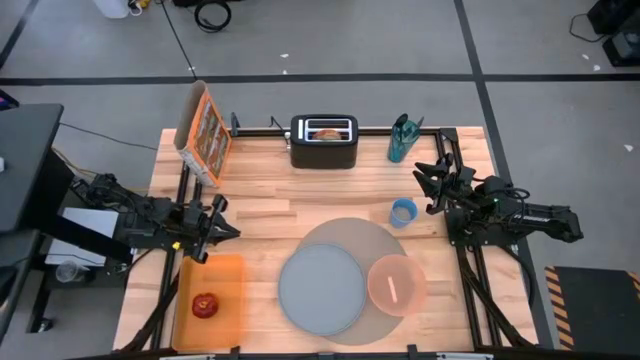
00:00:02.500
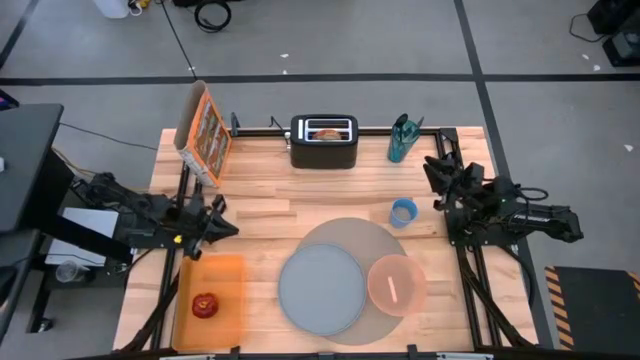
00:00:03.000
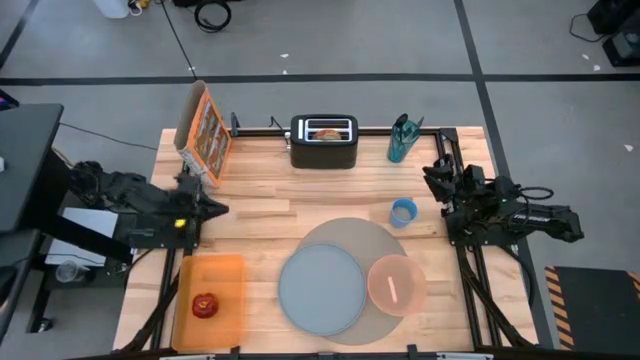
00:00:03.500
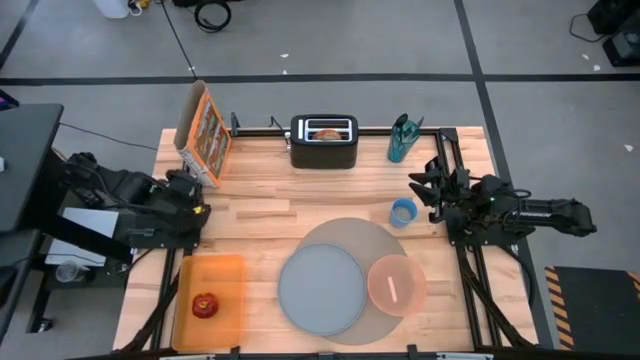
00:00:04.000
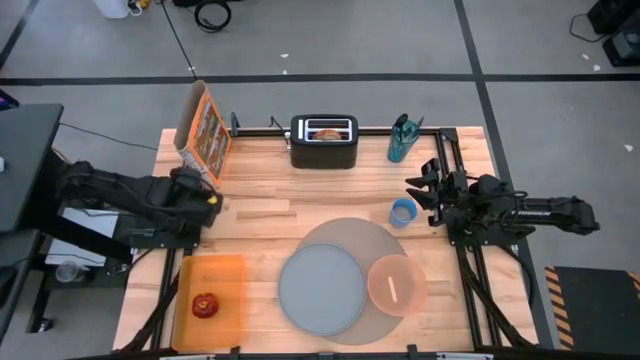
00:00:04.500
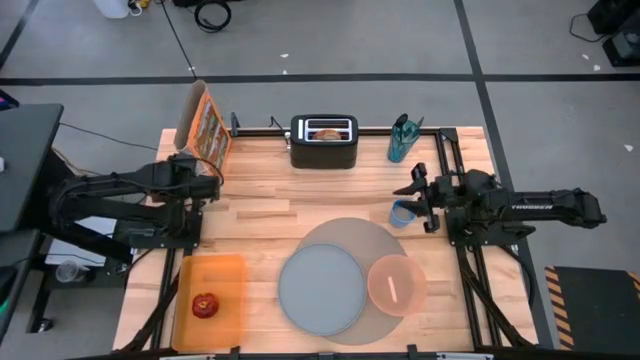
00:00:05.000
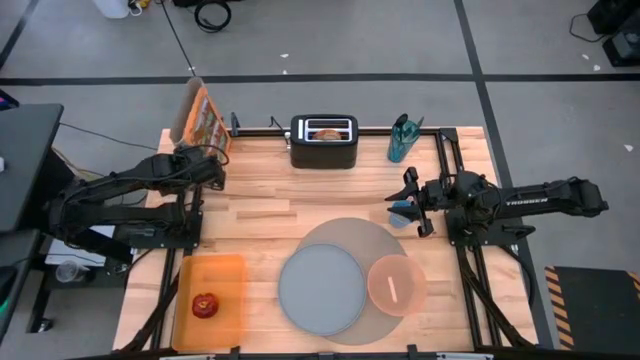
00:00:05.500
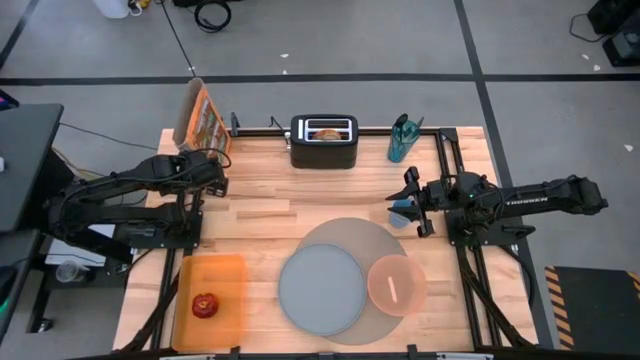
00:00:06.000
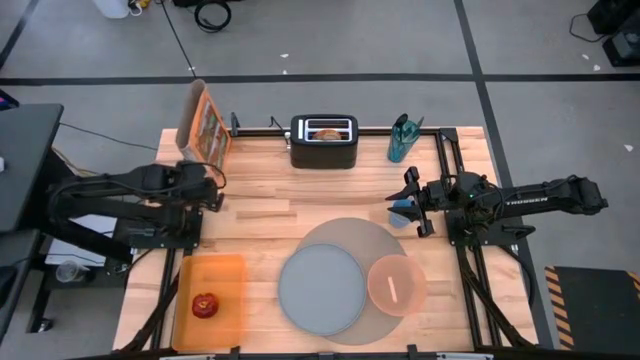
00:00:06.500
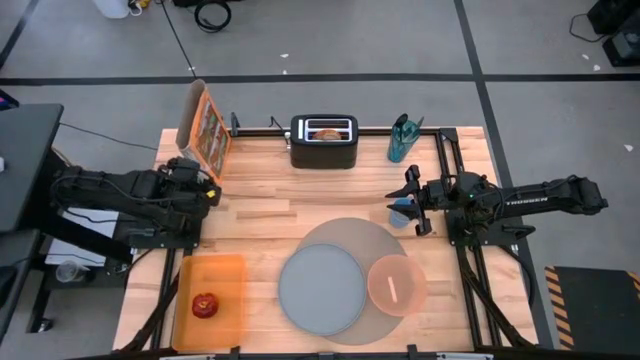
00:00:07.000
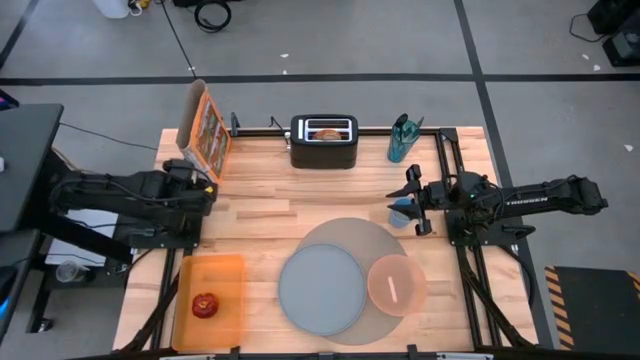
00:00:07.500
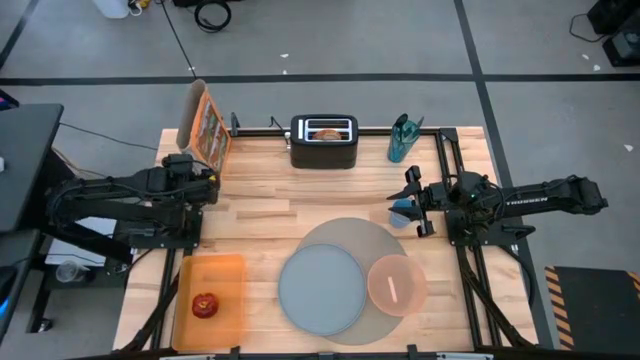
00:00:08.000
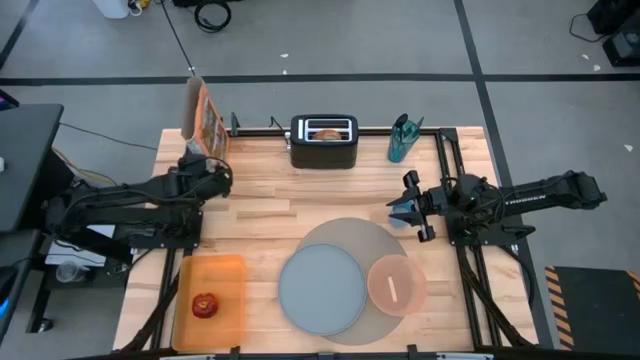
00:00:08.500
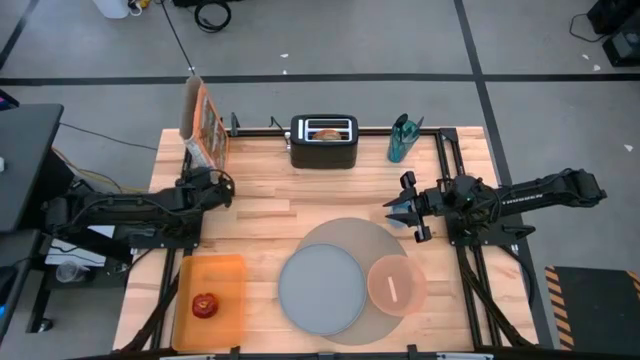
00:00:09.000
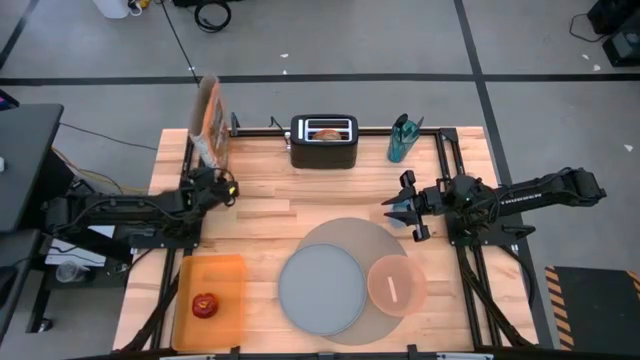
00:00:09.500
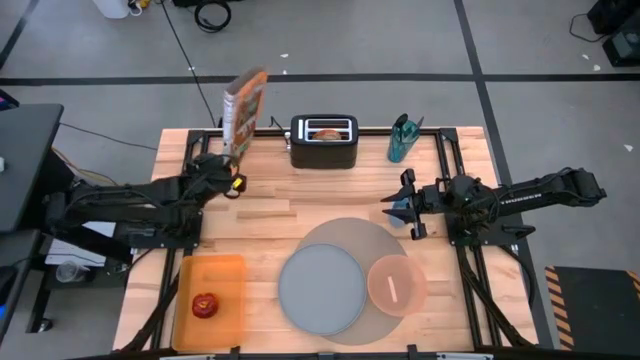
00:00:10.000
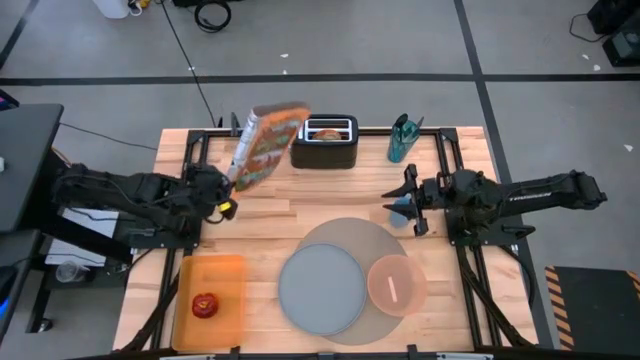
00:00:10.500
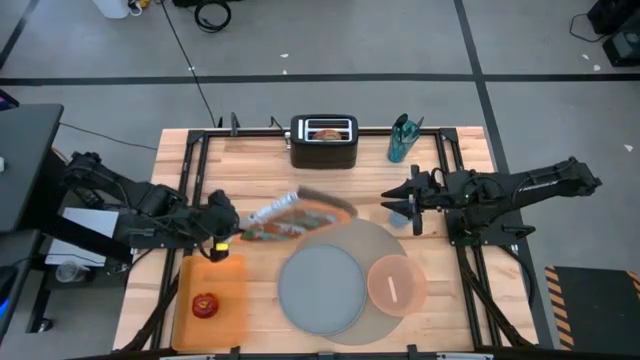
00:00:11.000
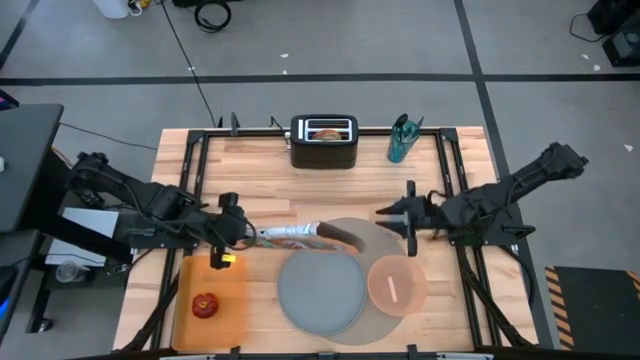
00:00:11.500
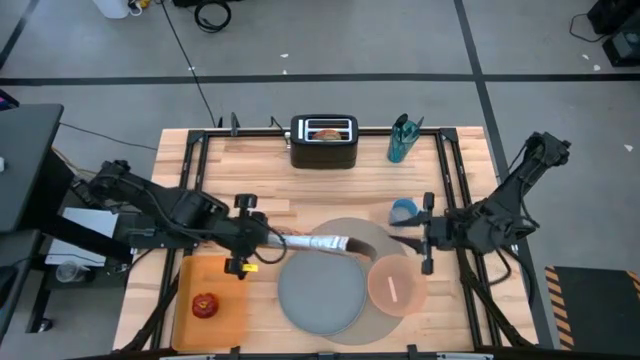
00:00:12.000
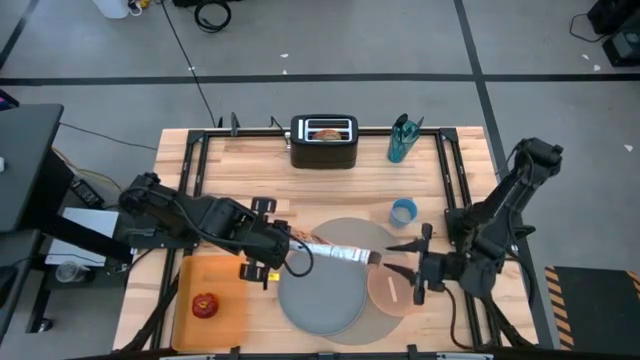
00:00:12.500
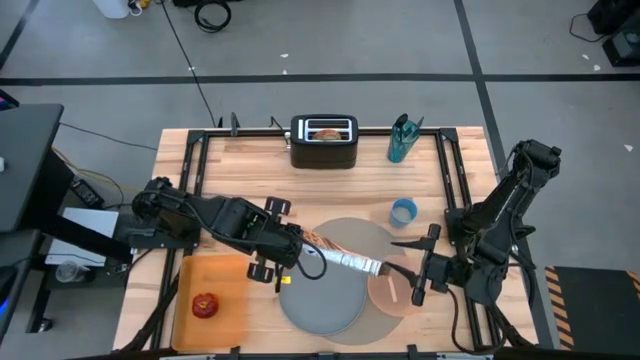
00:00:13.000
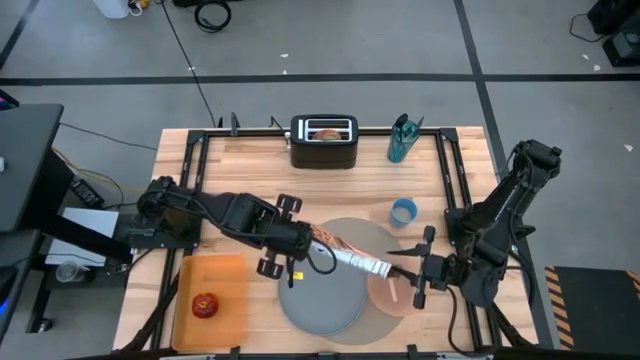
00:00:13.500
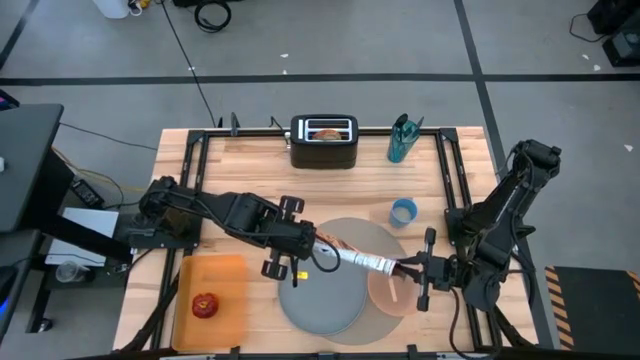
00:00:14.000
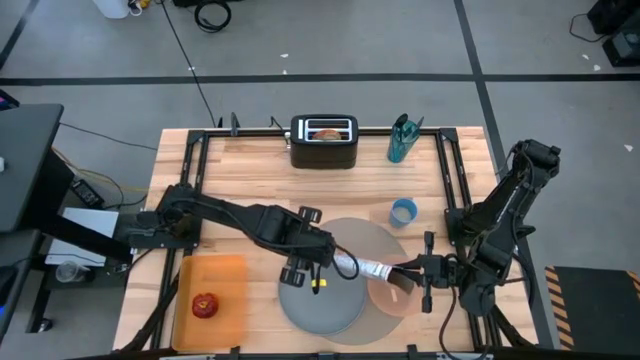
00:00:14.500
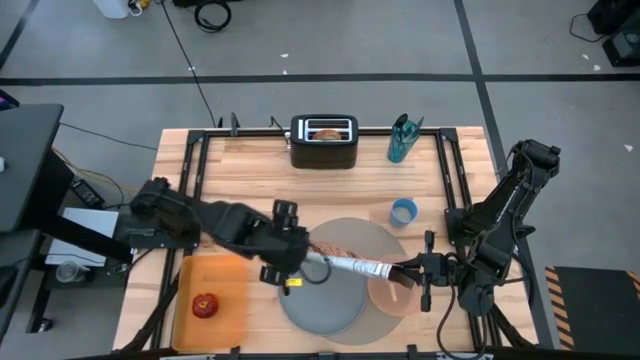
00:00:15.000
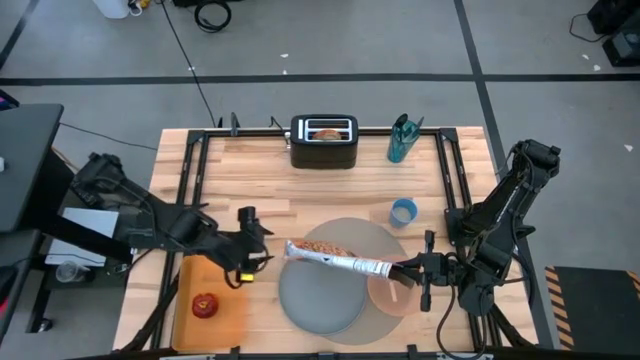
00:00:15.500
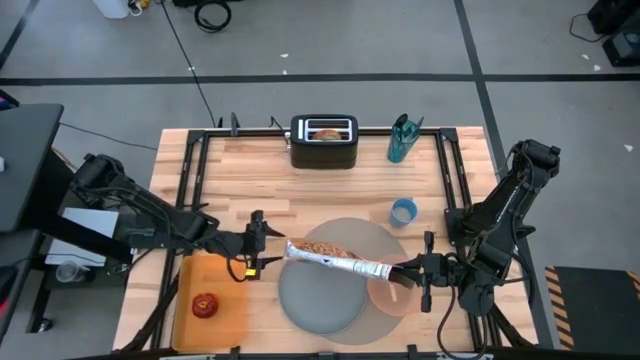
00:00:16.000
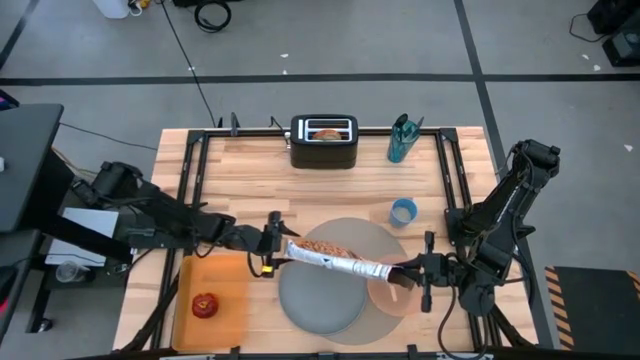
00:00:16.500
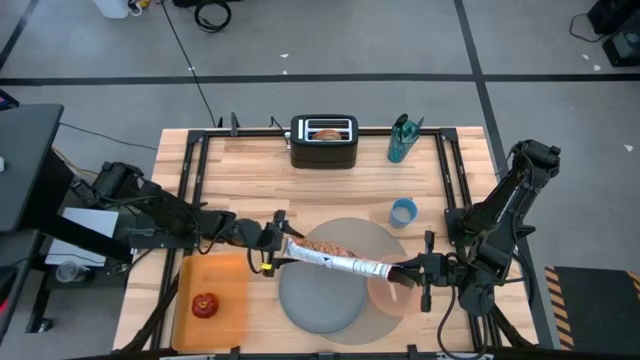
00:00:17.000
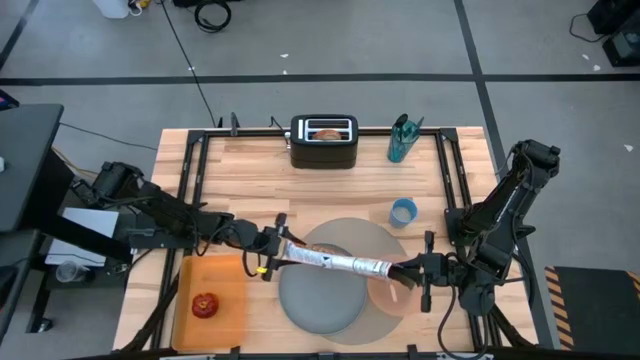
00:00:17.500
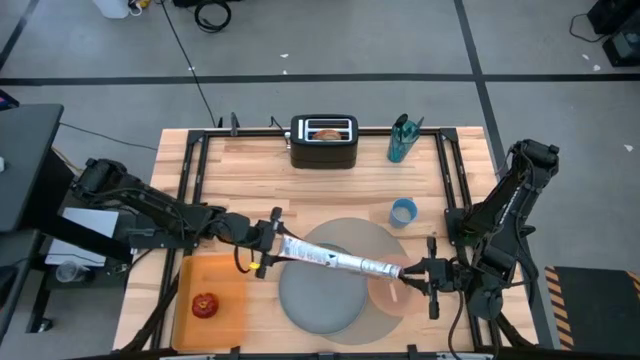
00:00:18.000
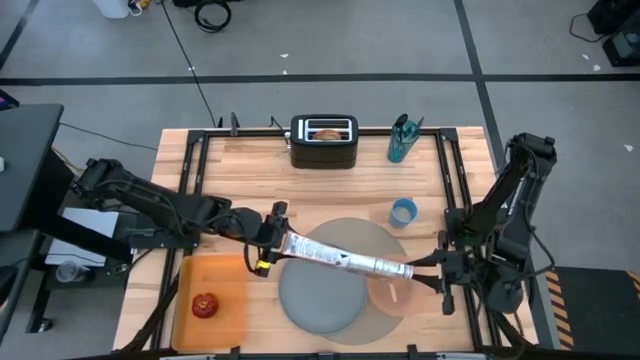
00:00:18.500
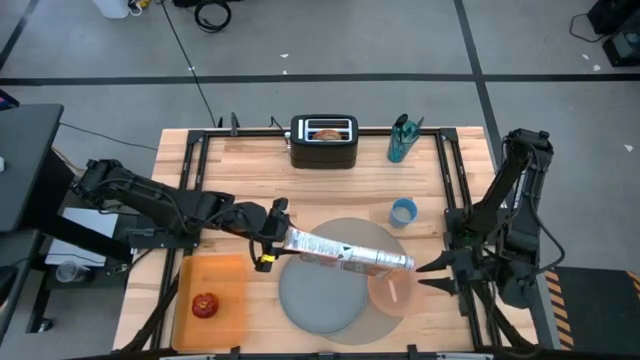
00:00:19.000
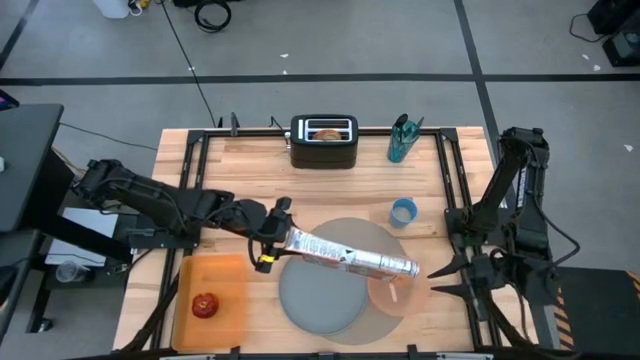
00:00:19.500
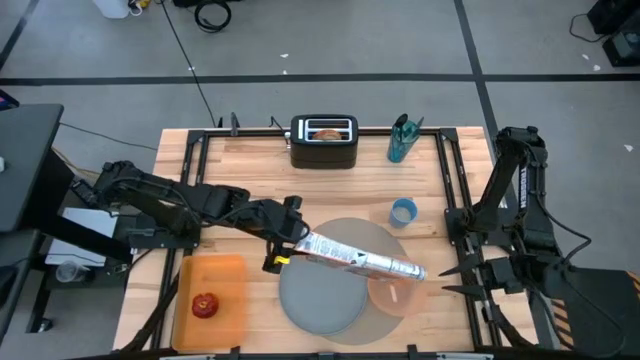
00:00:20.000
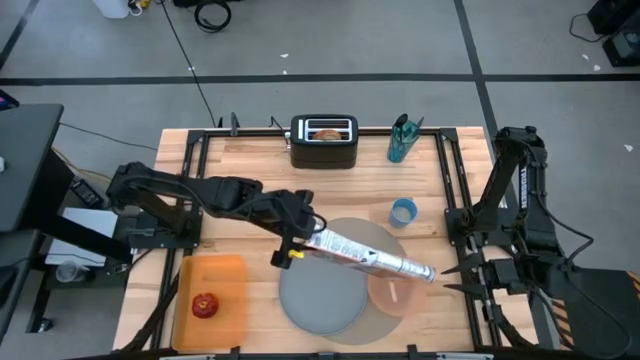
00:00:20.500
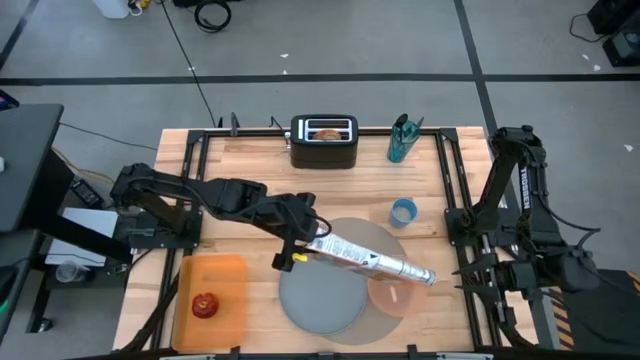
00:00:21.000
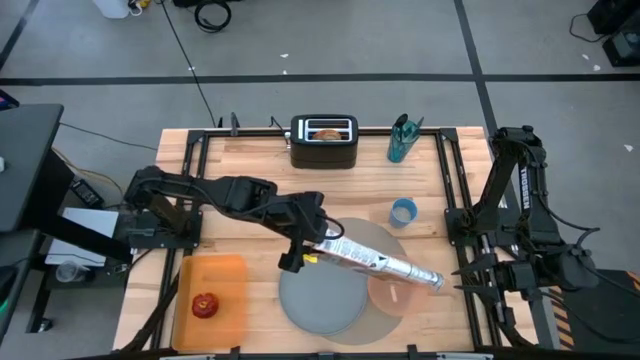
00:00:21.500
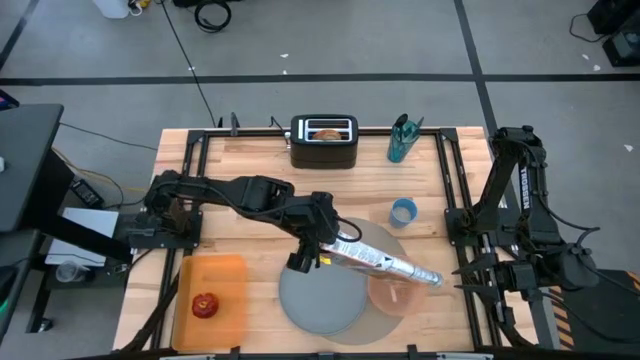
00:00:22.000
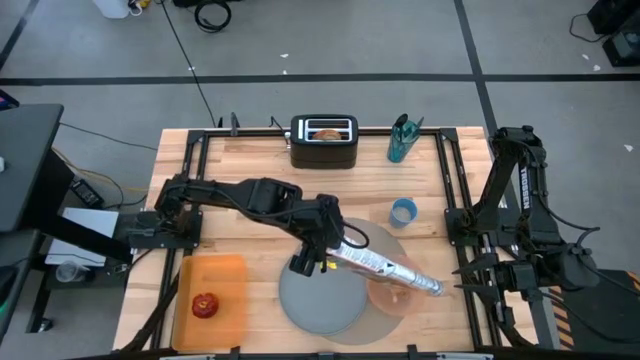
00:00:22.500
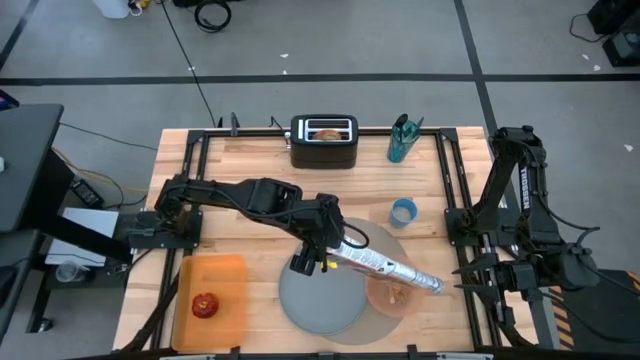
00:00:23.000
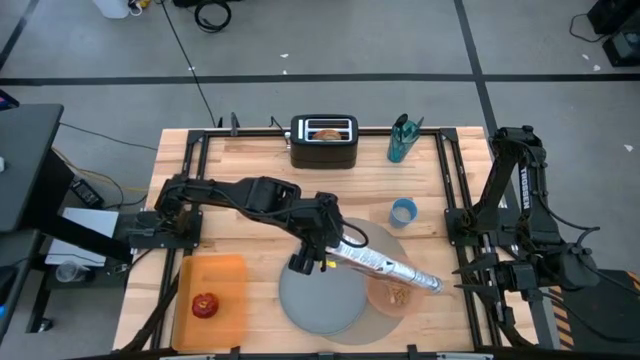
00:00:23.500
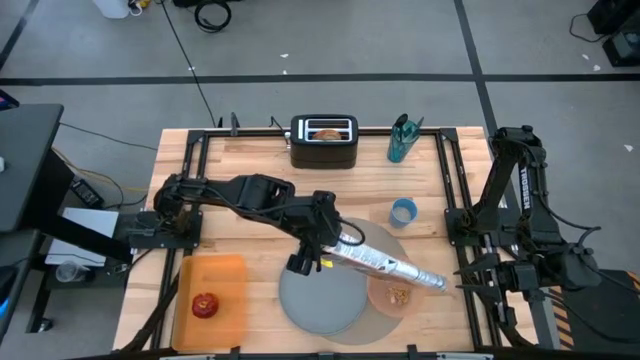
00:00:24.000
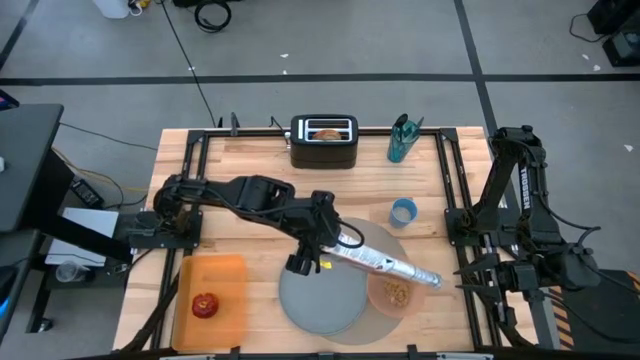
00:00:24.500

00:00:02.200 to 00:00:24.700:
Task: Arrange a breakfast setting
Pour the cereal into the orange bowl
